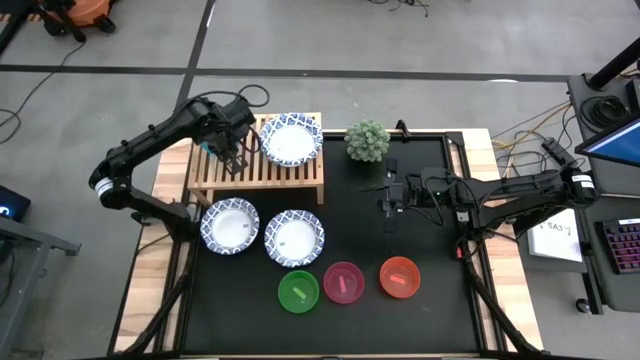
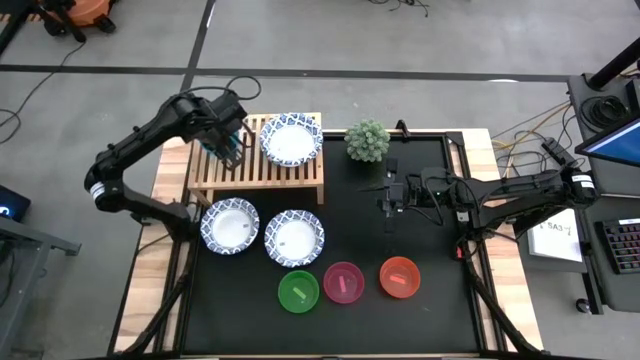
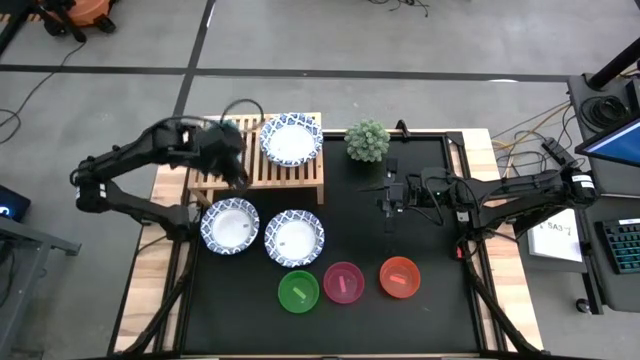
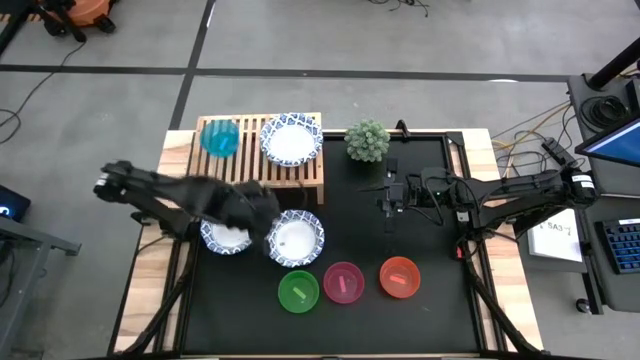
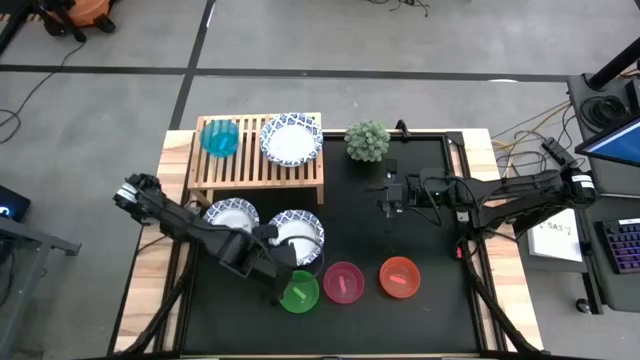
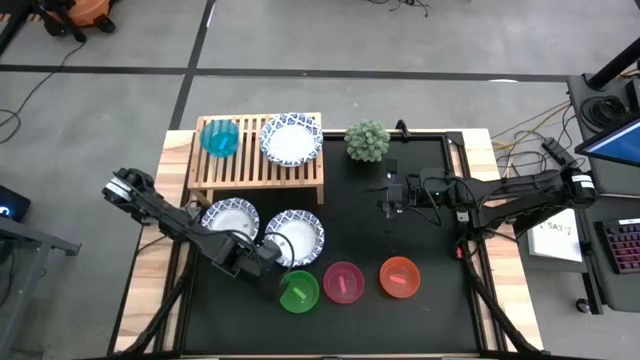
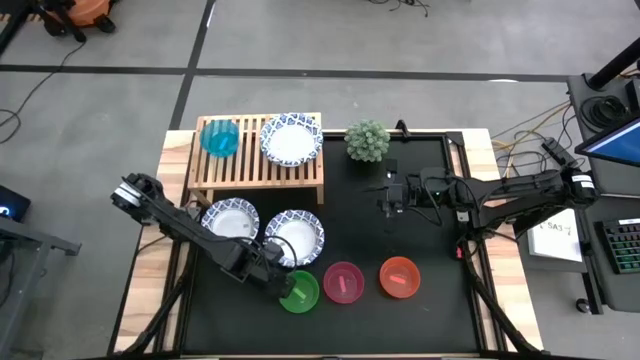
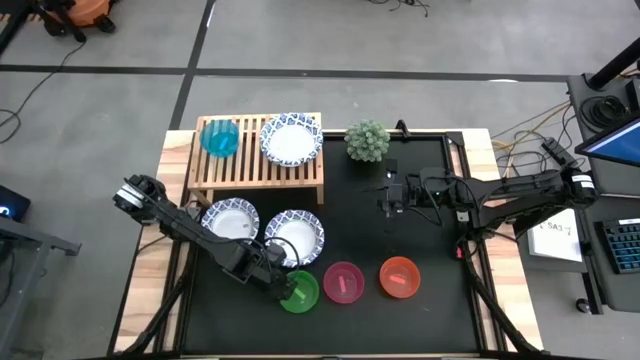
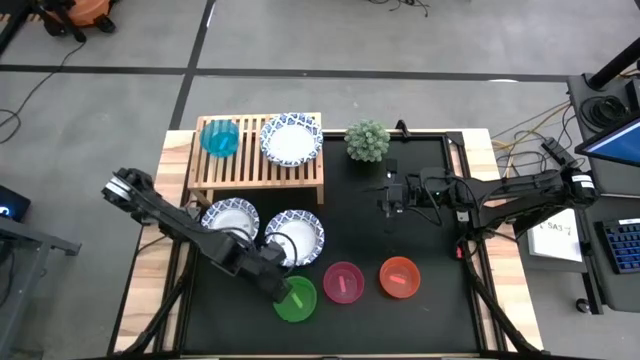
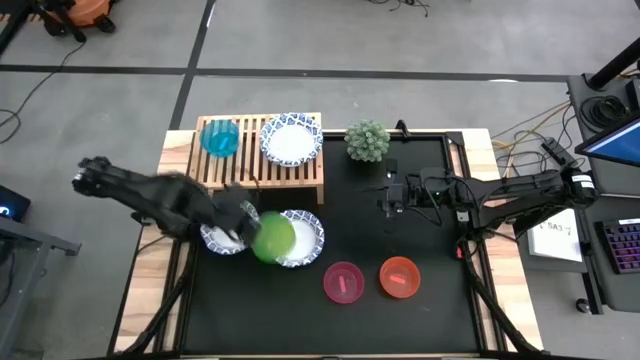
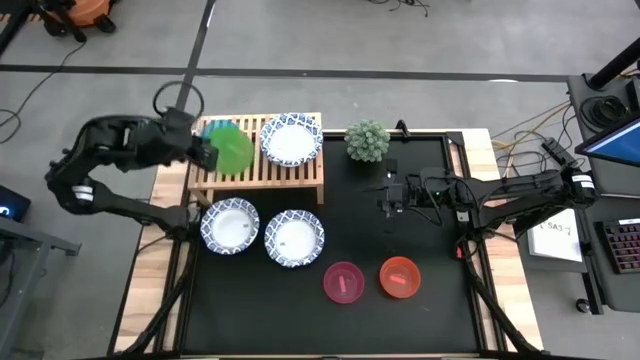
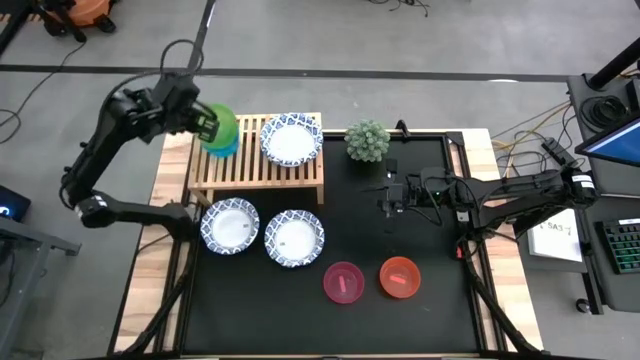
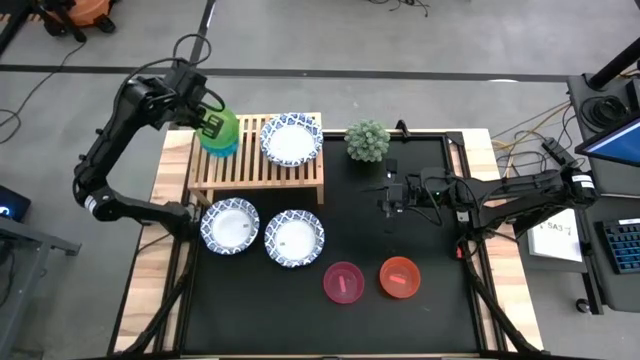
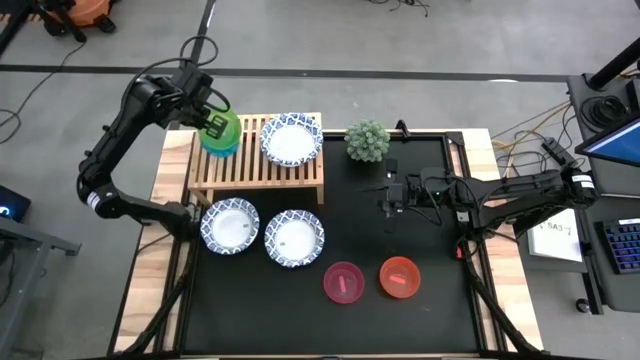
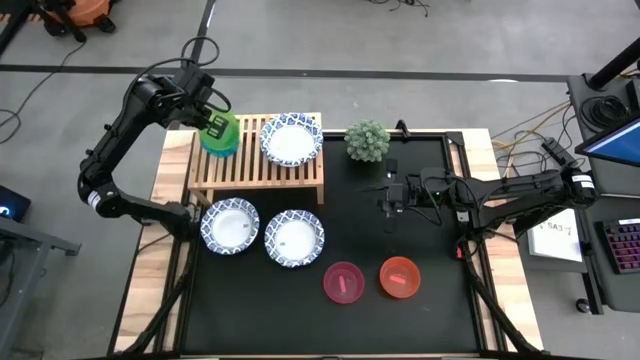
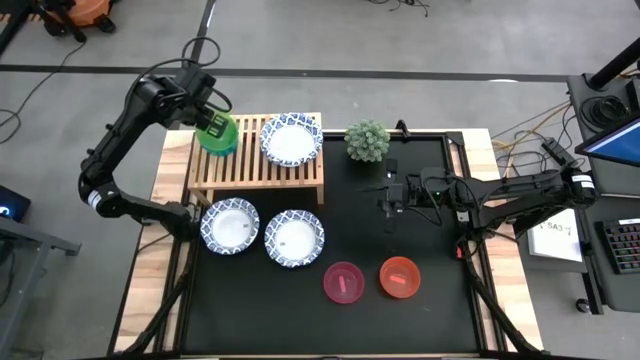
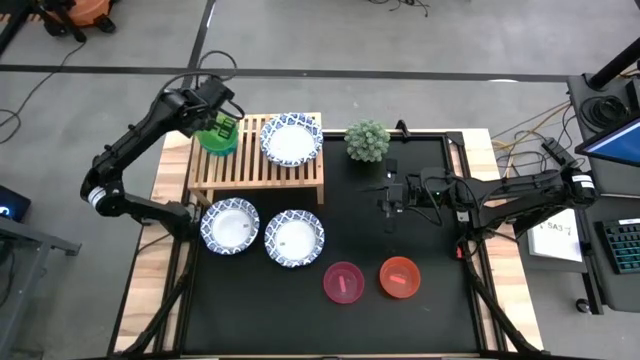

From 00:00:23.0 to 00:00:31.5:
Task: Place and stack bowls onto a shelf
Stack the green bowl on top of the blue bowl on the shelf

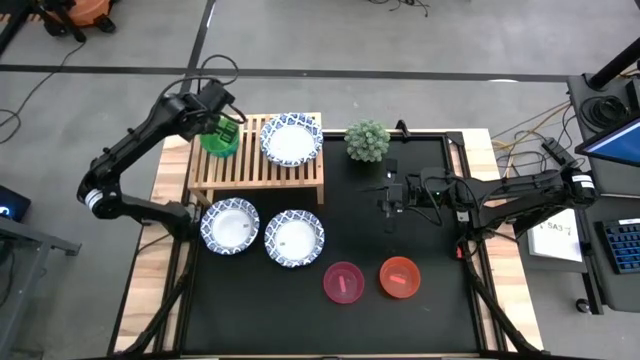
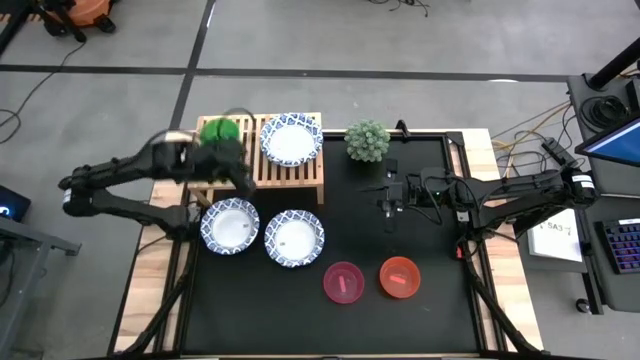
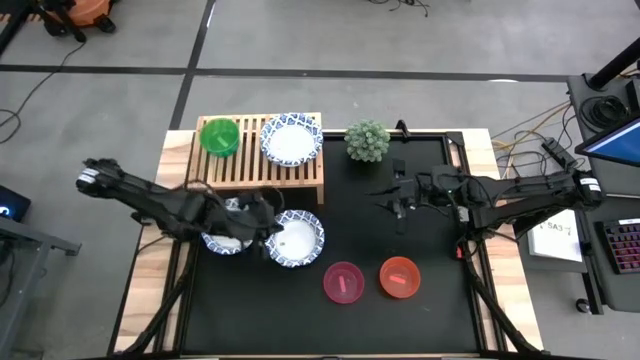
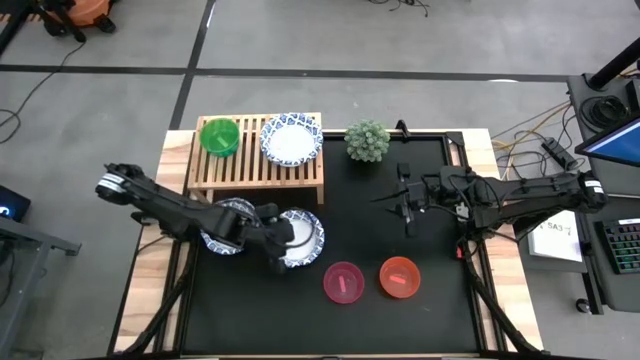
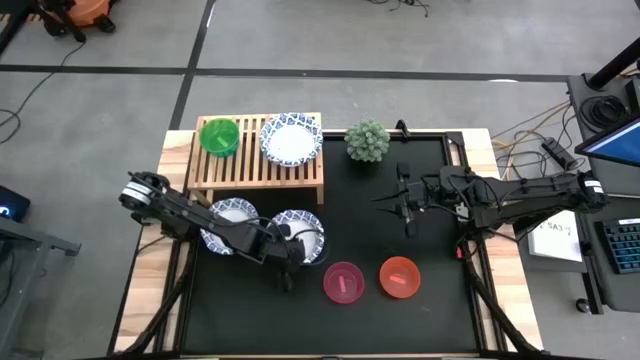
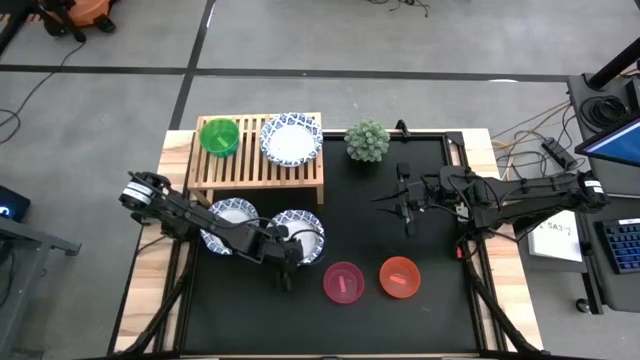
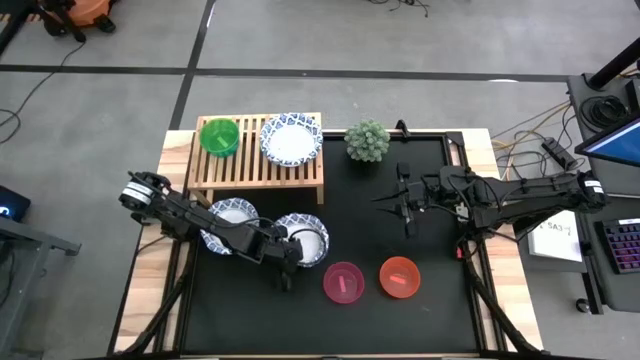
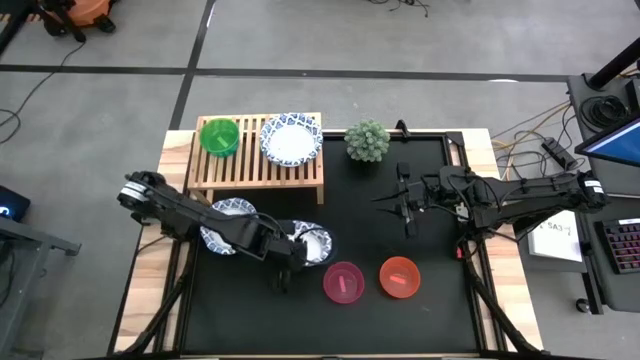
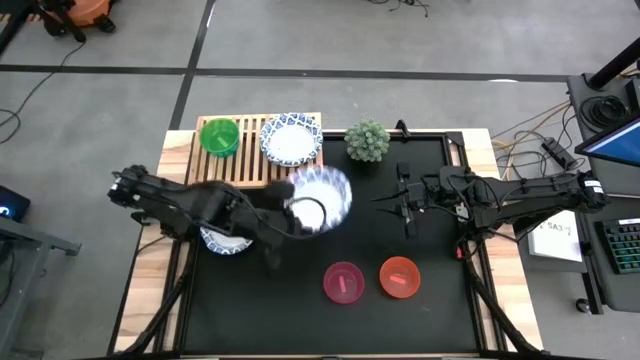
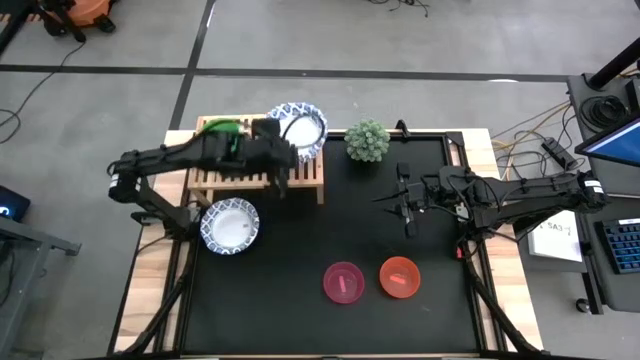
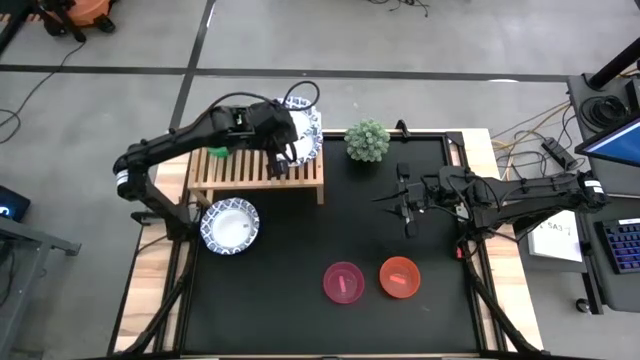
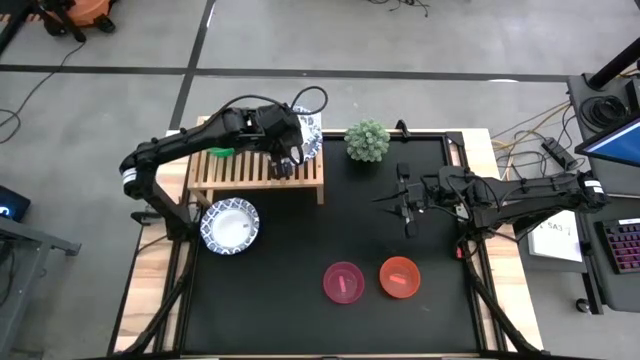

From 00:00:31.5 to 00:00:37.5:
Stack the right blue patterned bowl on top of the blue patterned bowl on the shelf

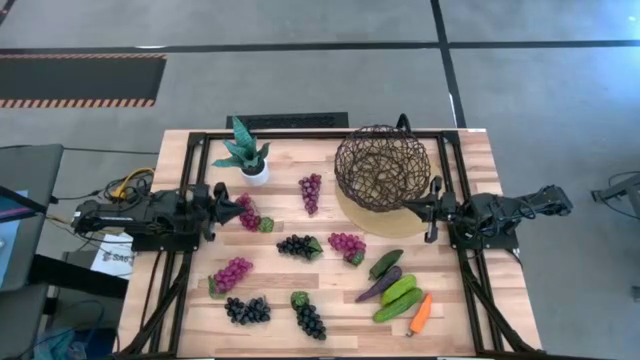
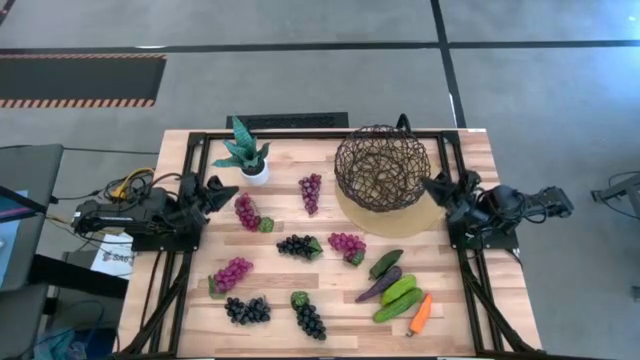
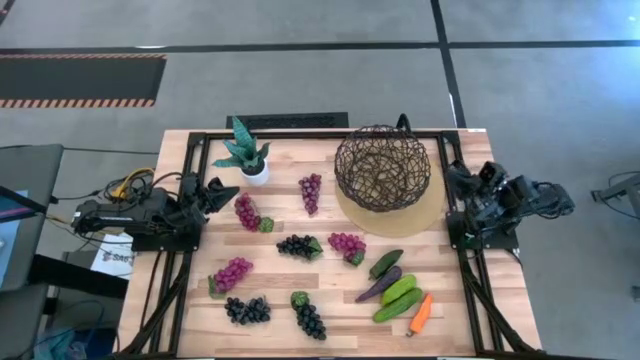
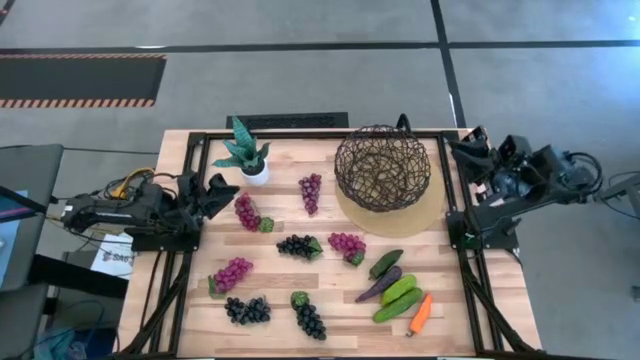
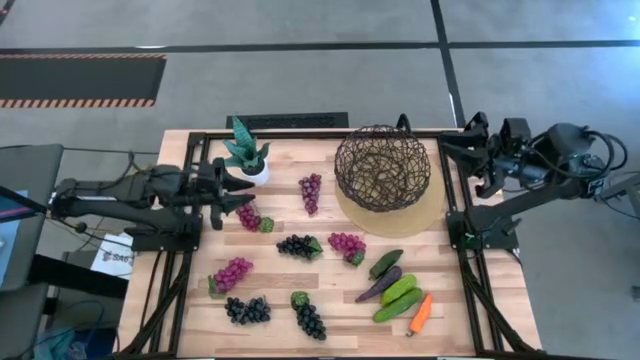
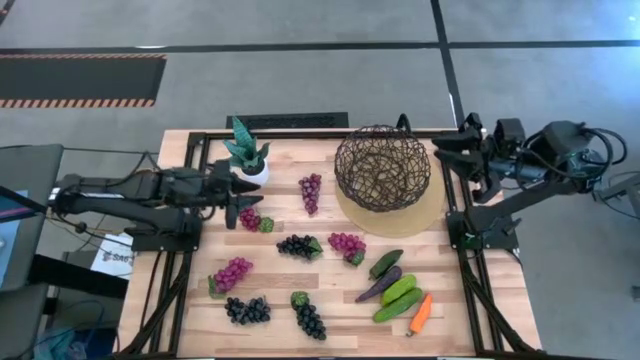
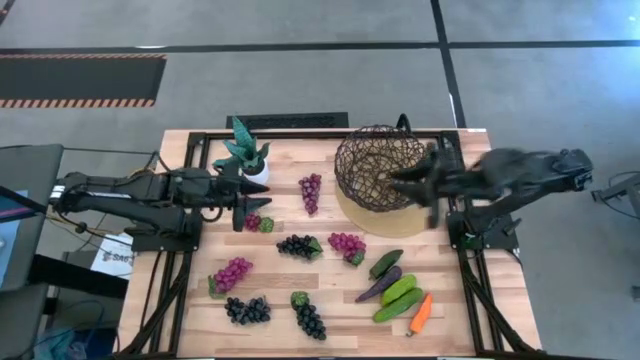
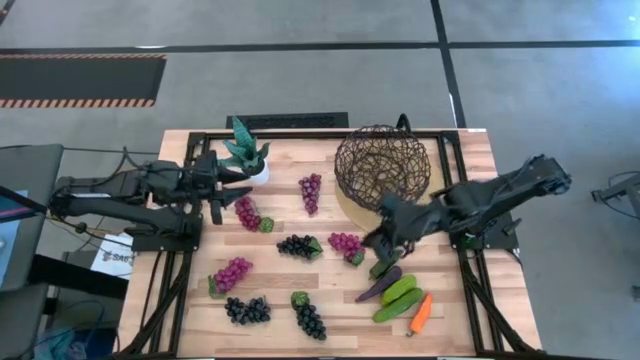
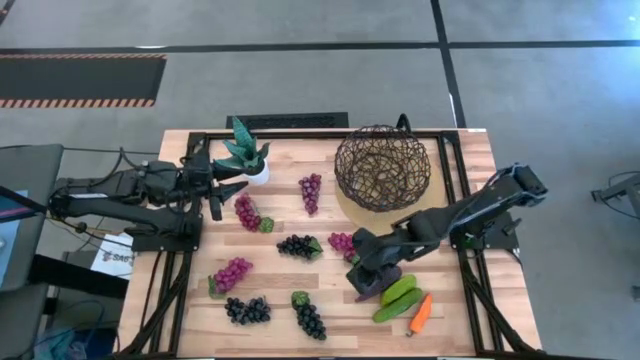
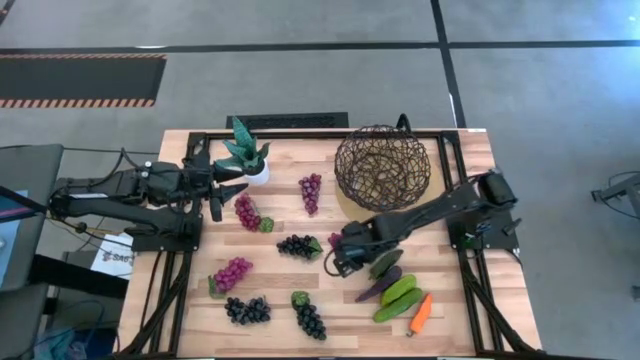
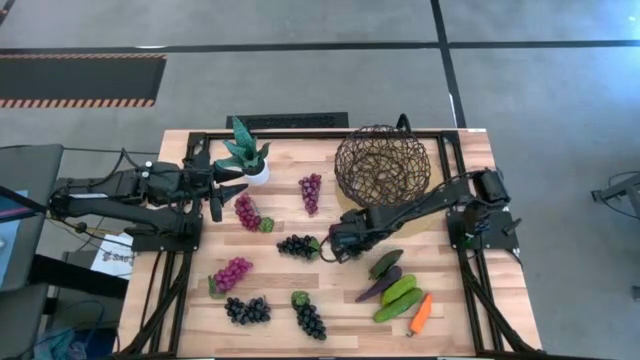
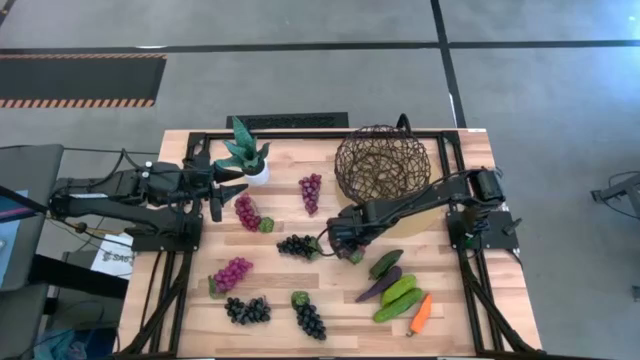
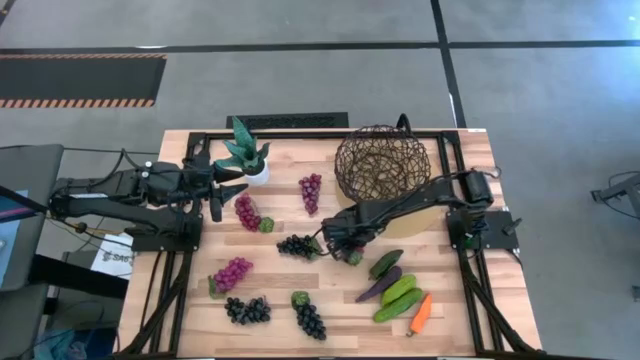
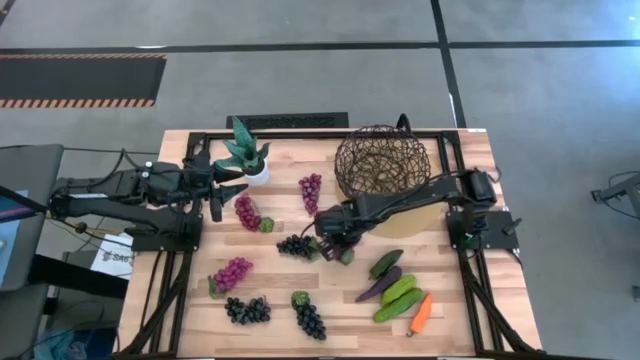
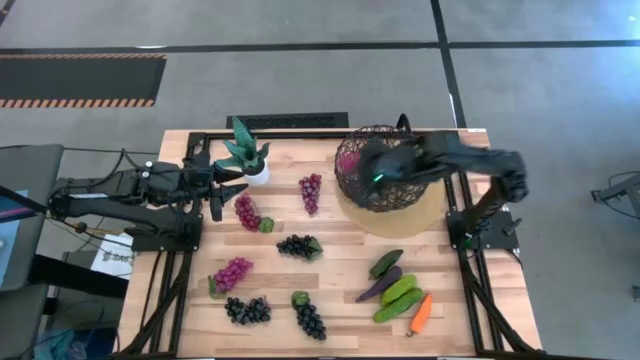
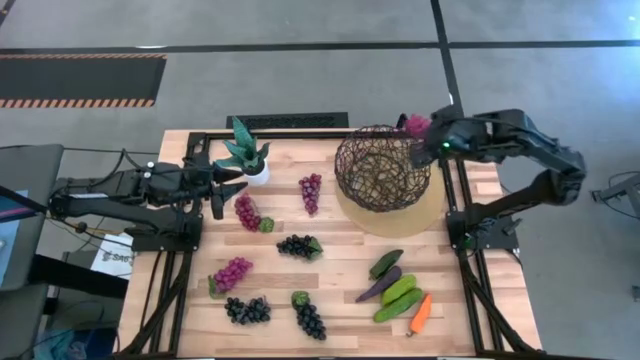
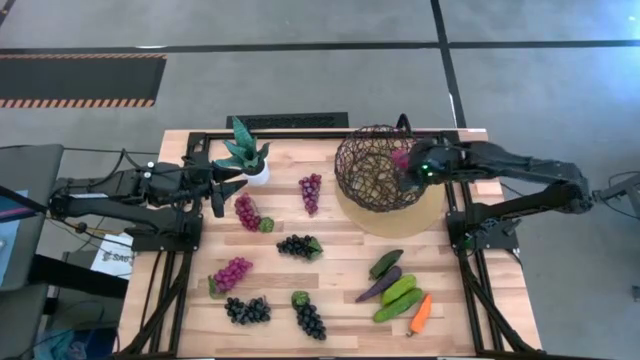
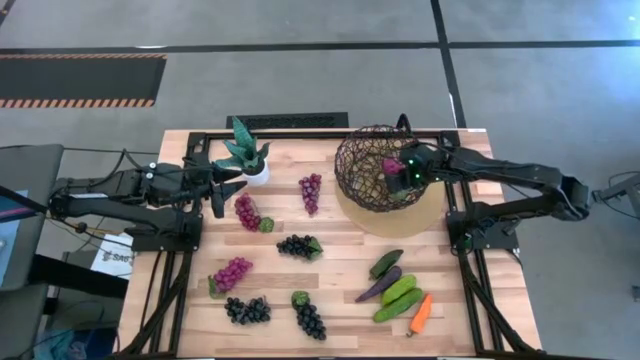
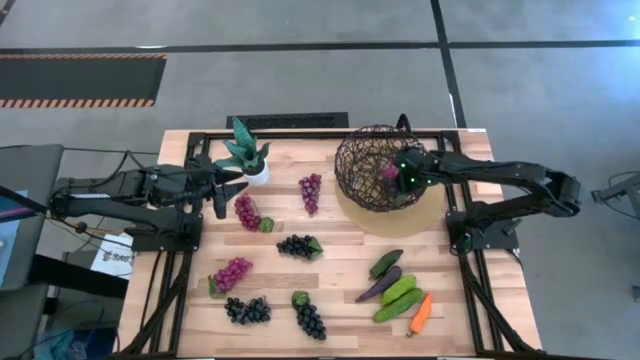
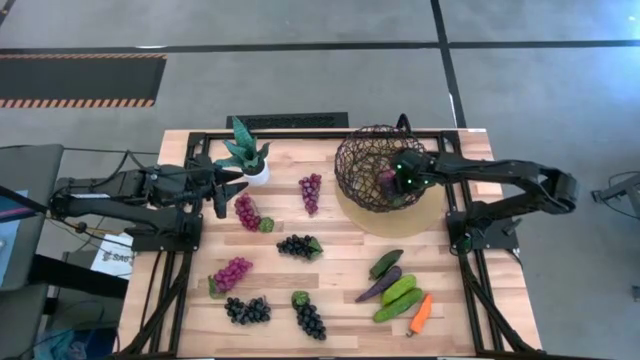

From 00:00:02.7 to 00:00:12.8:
Task: Build produce basket
Put the purple grapes into the black wire basket
